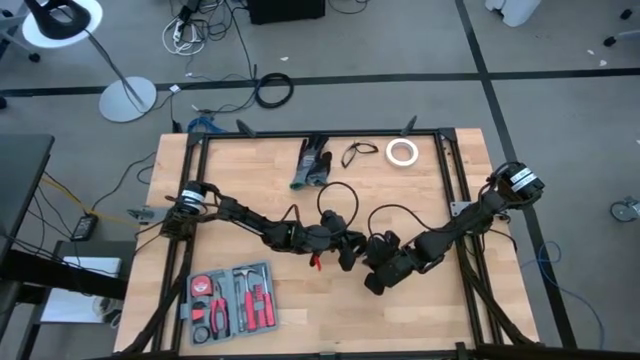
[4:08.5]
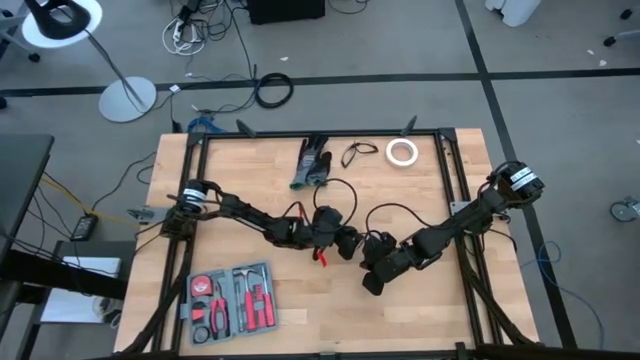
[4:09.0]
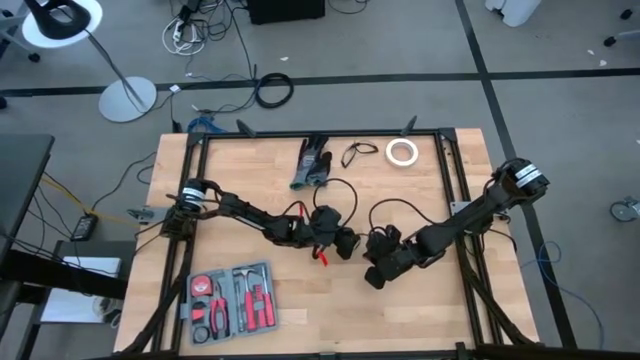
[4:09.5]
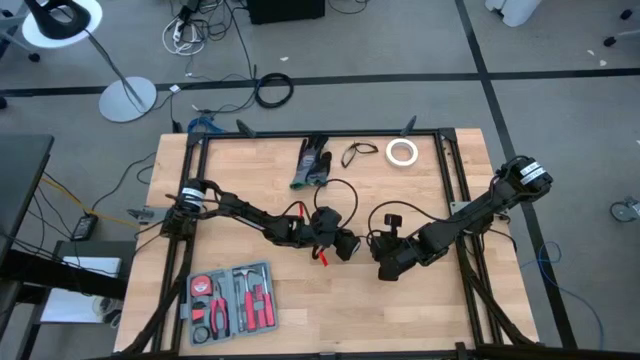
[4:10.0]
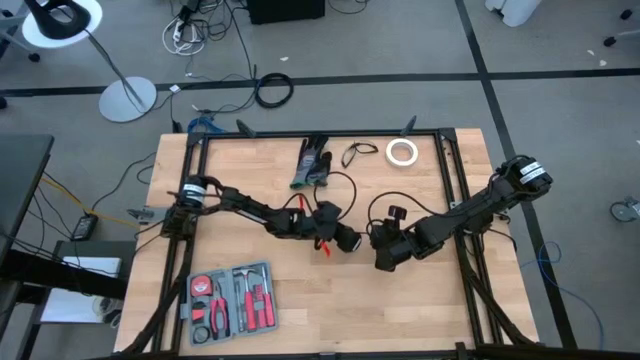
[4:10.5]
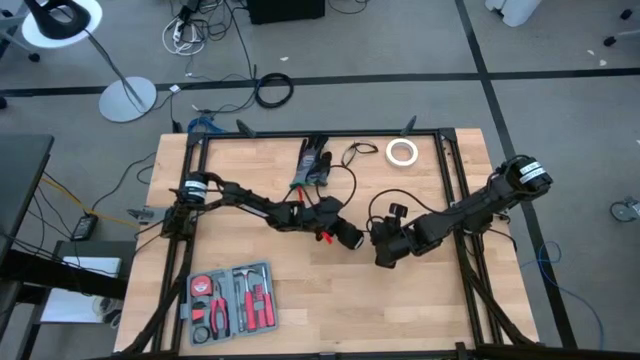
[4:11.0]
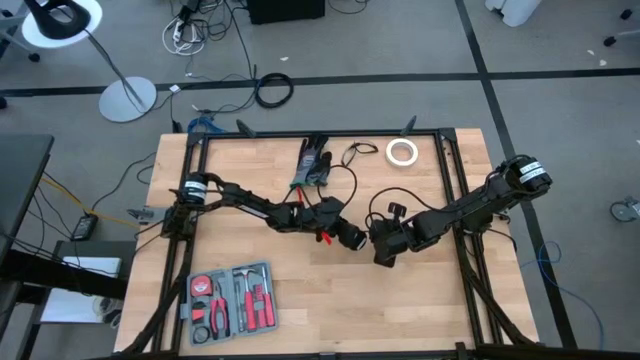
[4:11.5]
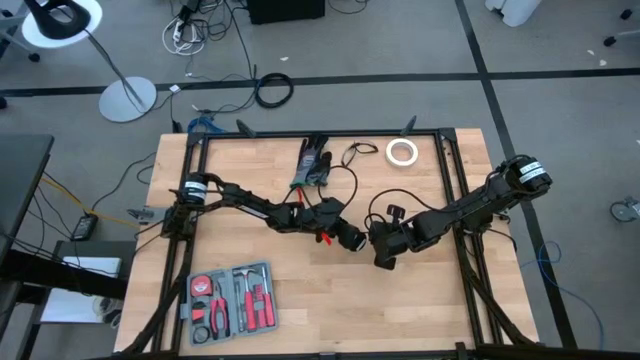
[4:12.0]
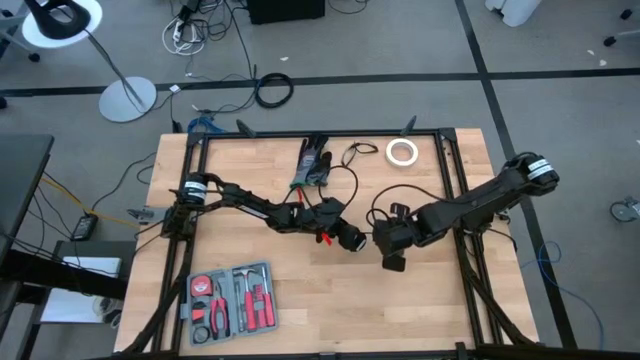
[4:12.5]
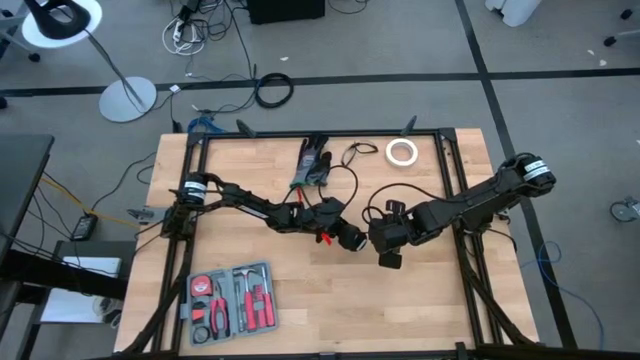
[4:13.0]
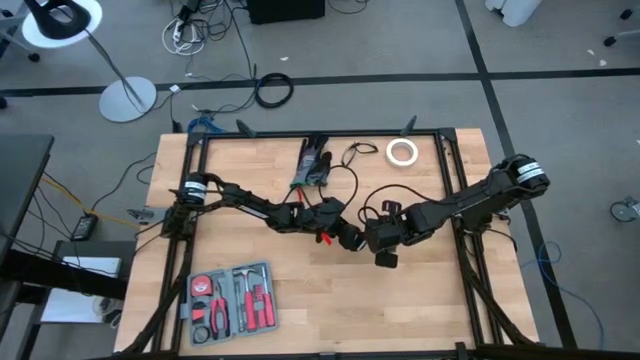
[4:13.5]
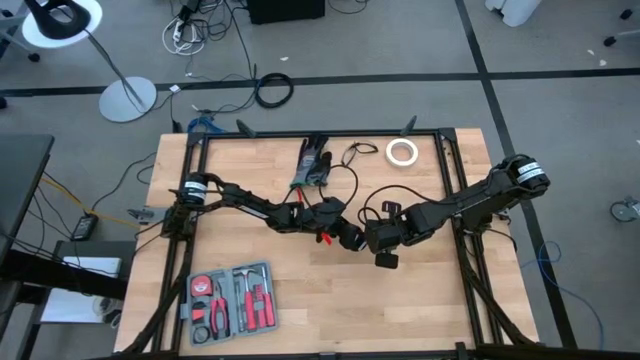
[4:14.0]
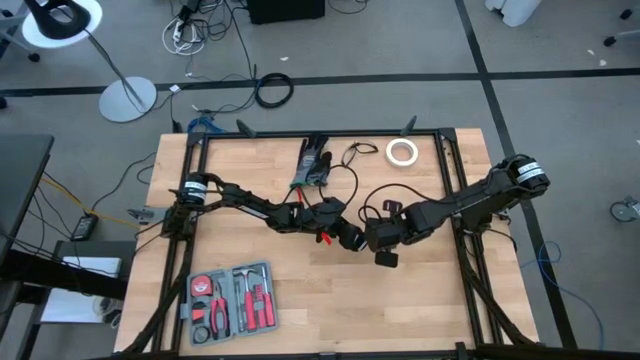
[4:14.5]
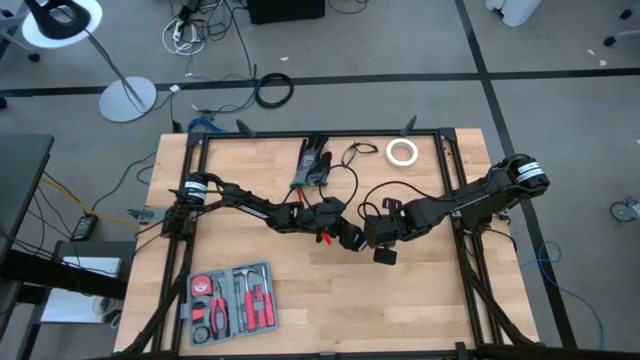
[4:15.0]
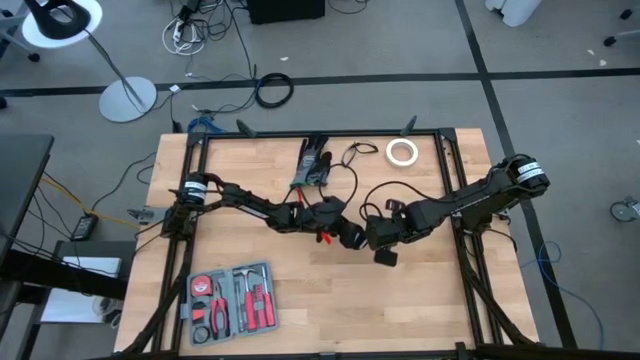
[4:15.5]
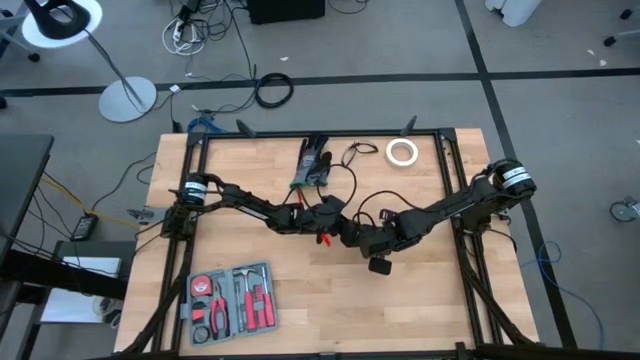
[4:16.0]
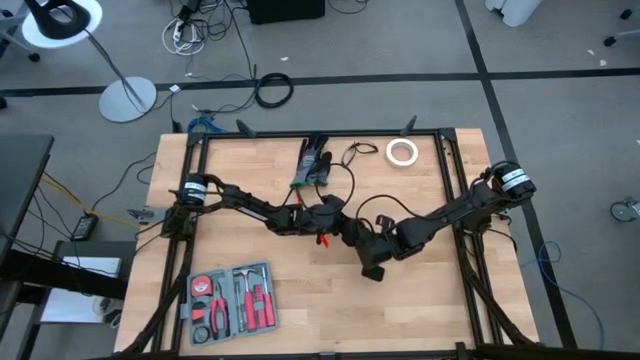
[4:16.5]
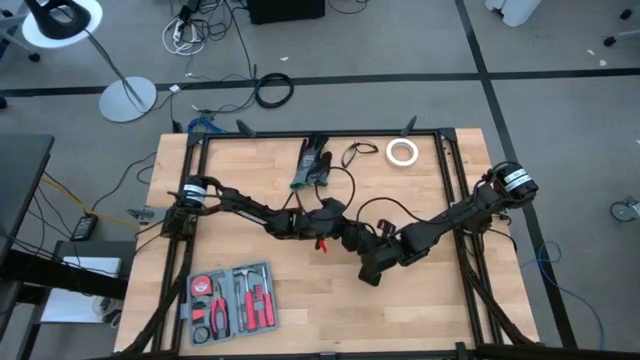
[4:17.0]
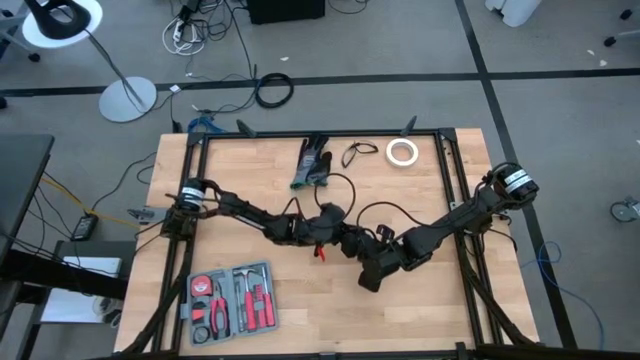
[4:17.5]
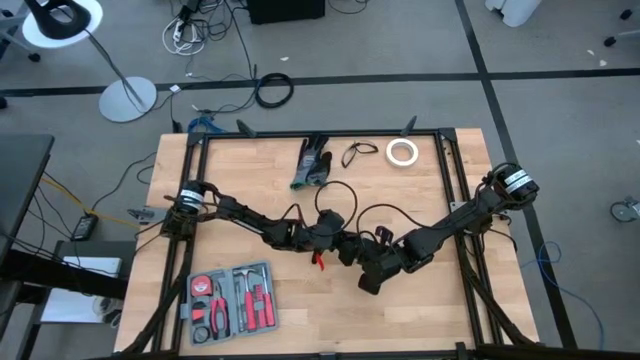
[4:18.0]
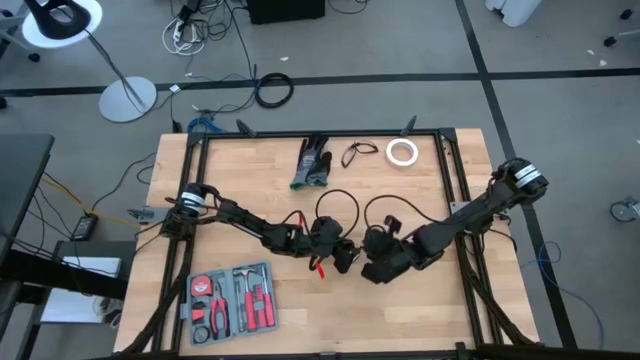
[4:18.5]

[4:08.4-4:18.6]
Task: Coil cords
Coil the black wire into a spool

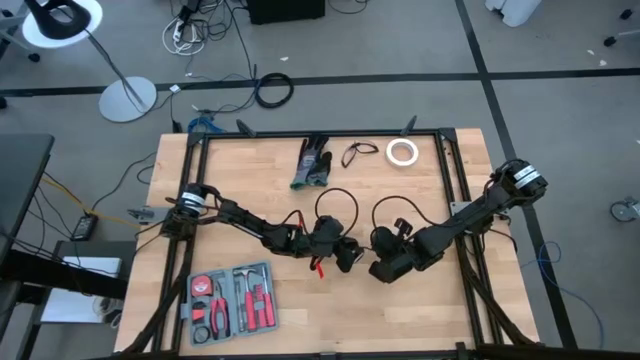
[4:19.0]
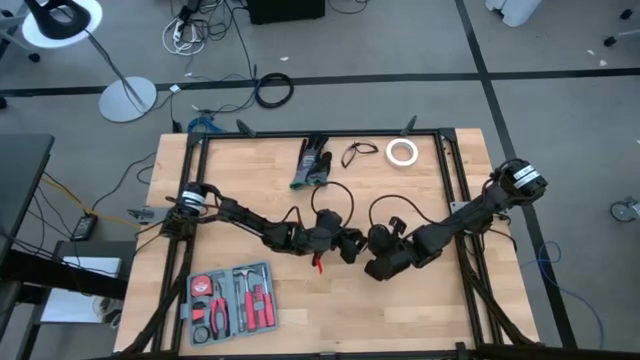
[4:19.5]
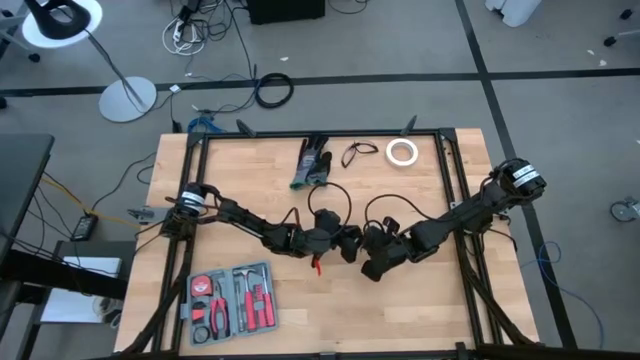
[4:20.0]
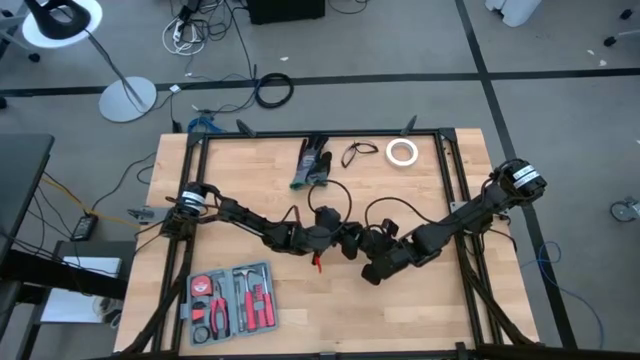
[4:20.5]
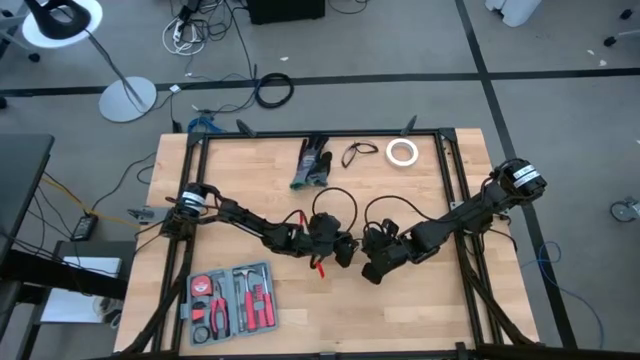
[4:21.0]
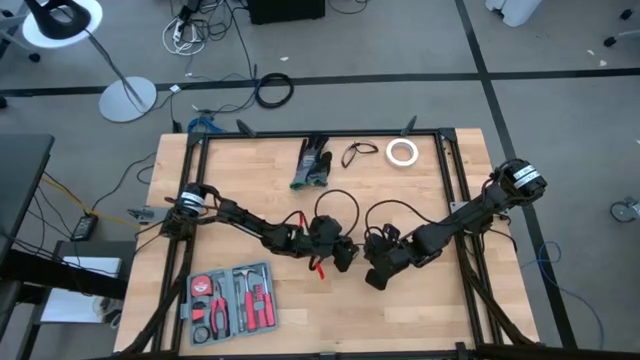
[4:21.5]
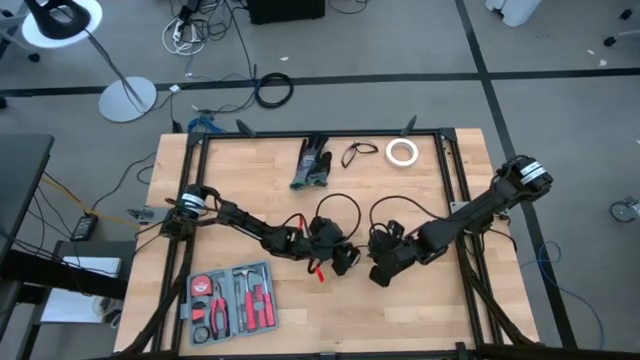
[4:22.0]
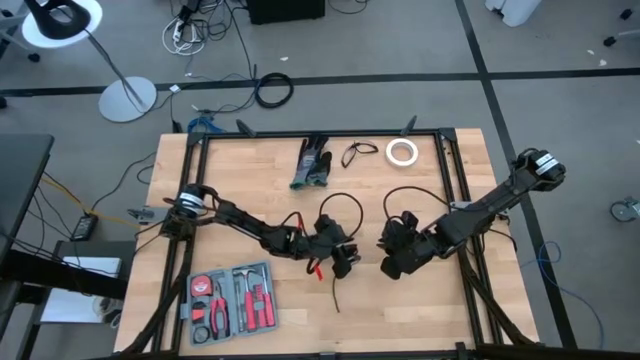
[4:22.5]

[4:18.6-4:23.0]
Coil the black wire into a spool

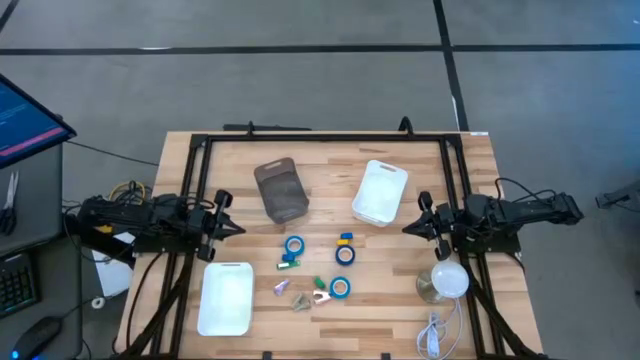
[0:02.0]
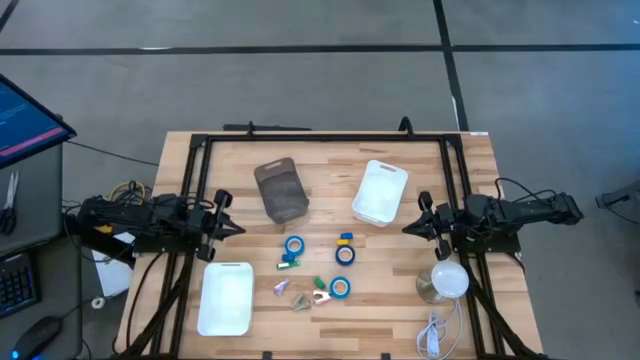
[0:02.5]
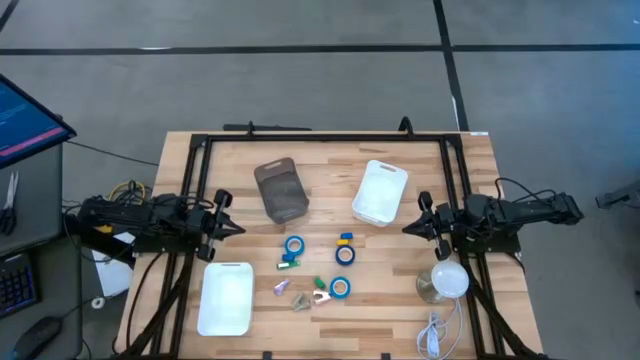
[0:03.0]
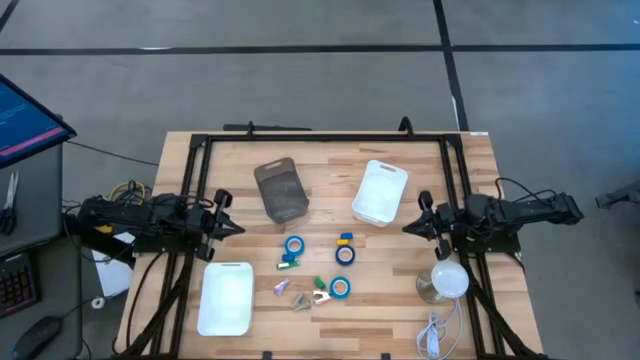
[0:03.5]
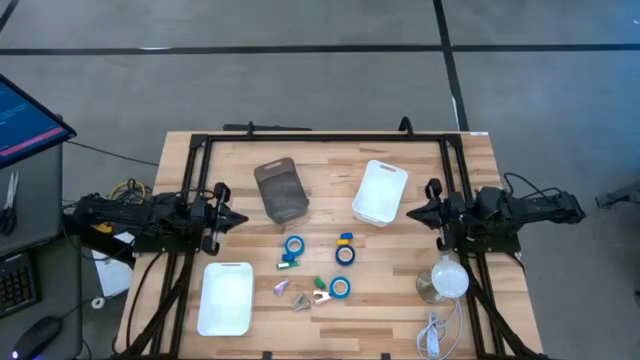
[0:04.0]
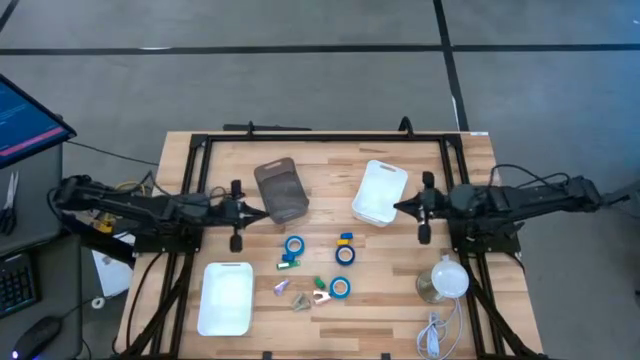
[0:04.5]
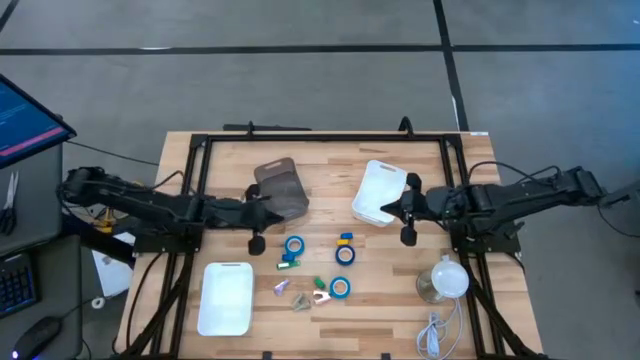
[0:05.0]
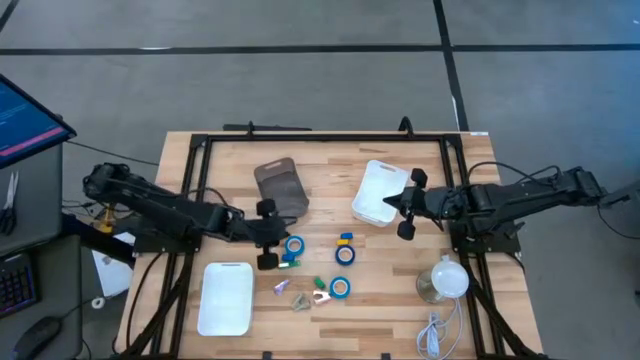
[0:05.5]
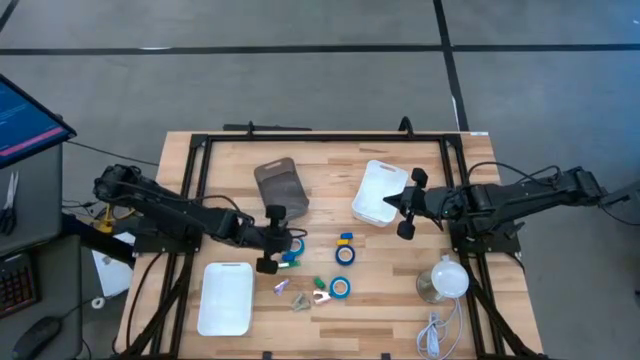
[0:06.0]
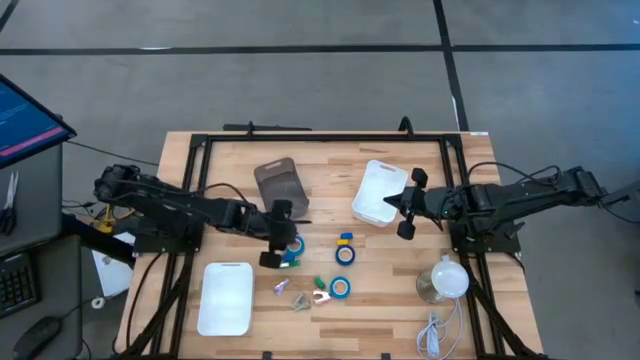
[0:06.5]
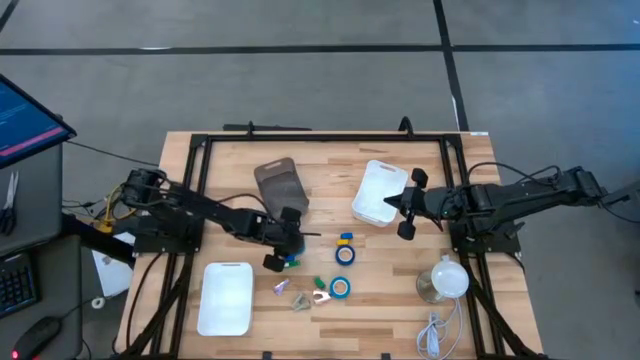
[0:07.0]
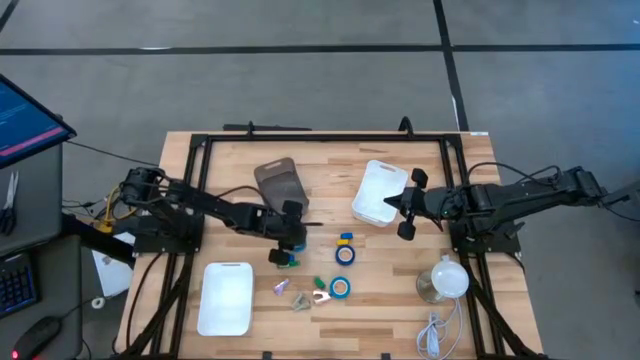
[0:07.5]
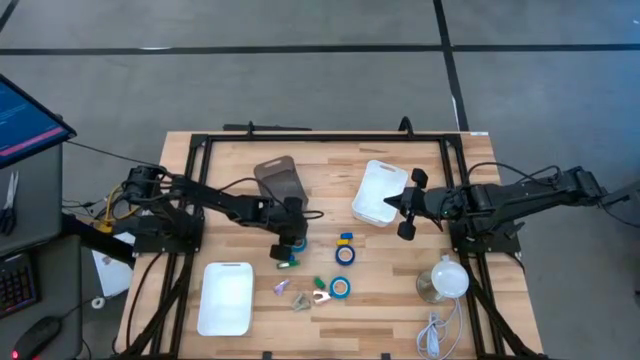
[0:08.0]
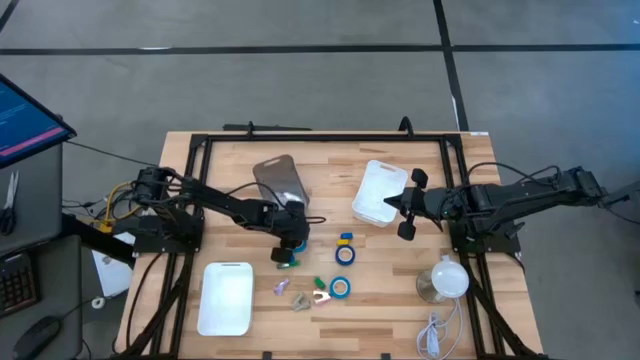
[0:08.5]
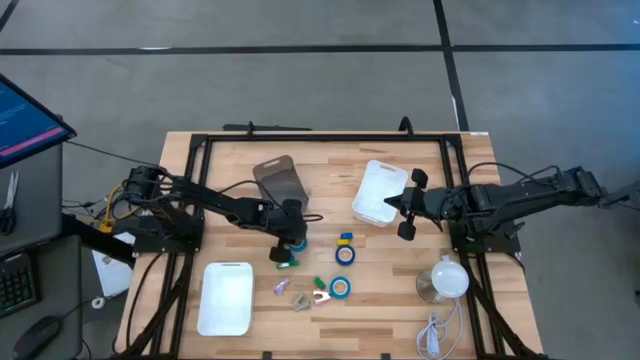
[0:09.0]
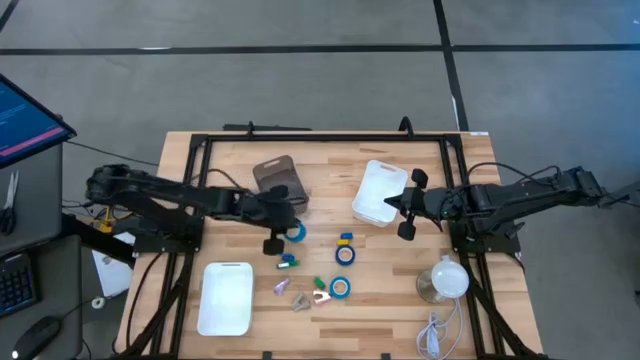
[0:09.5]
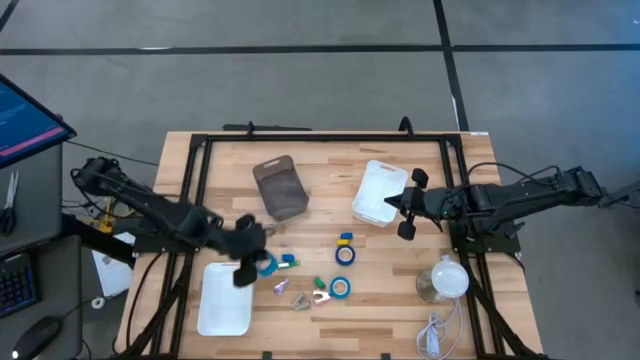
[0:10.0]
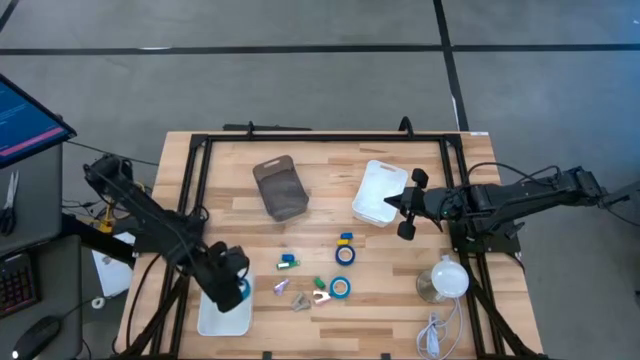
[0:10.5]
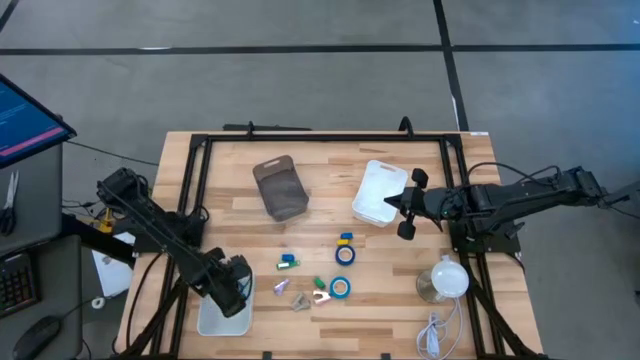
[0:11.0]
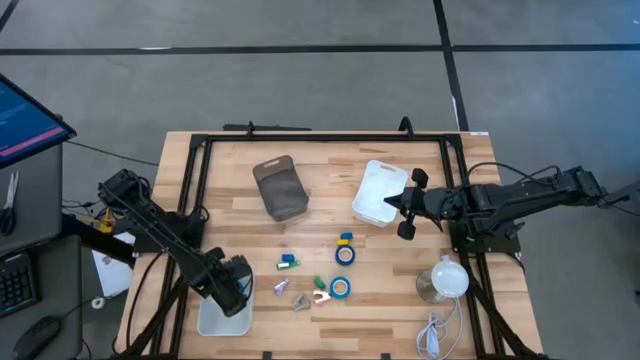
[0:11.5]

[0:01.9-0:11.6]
Task: Pick and place Stapler, Stapler remover, tape
Put the light blue tape into the bottom white bin
